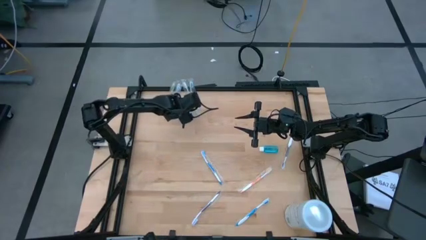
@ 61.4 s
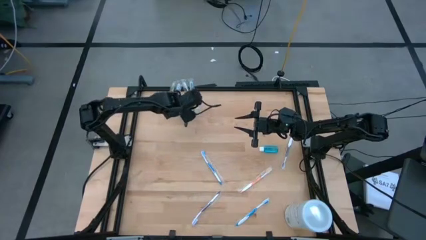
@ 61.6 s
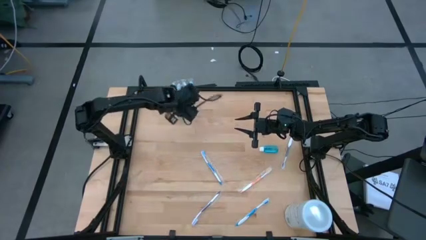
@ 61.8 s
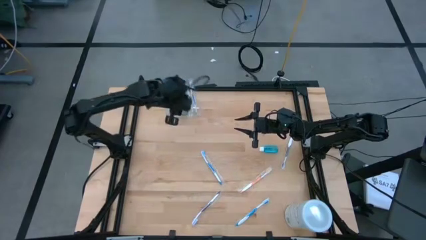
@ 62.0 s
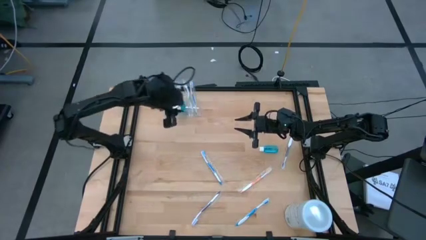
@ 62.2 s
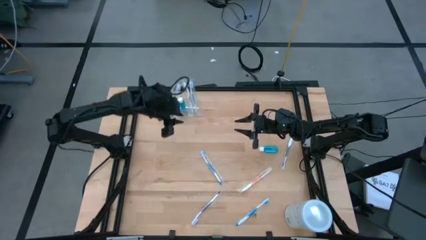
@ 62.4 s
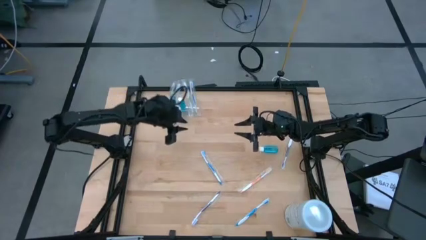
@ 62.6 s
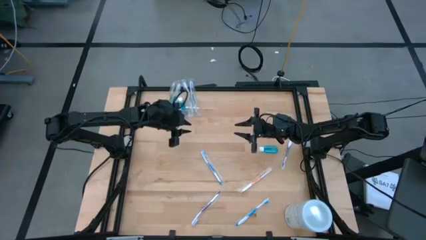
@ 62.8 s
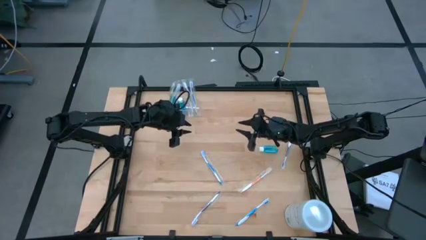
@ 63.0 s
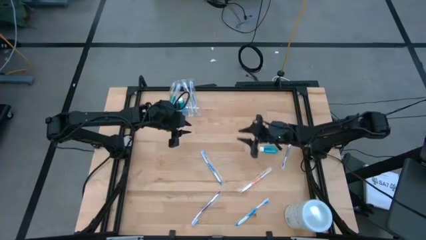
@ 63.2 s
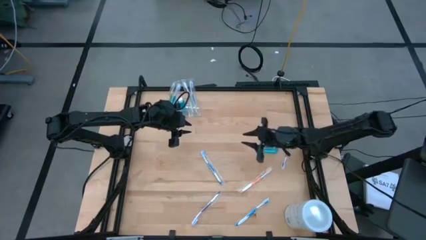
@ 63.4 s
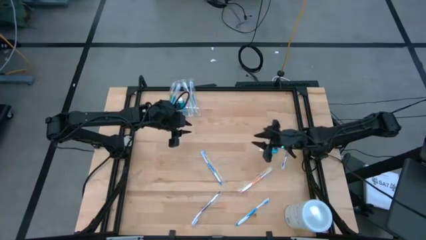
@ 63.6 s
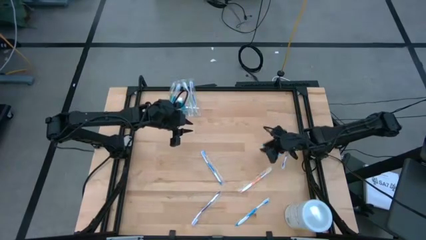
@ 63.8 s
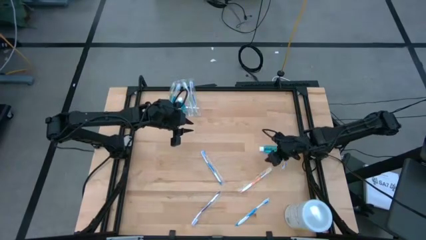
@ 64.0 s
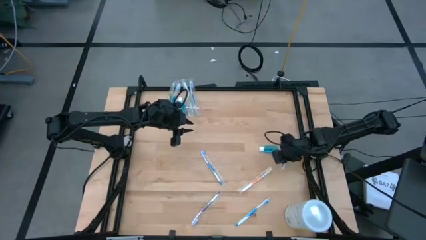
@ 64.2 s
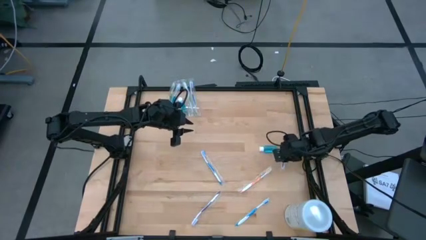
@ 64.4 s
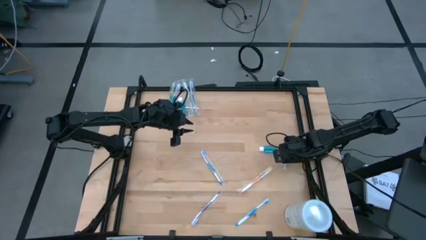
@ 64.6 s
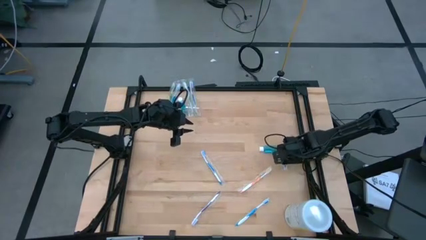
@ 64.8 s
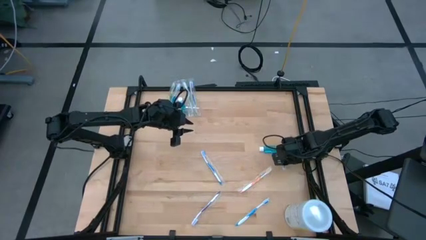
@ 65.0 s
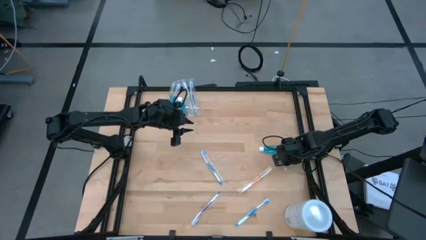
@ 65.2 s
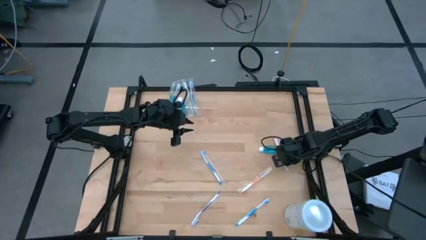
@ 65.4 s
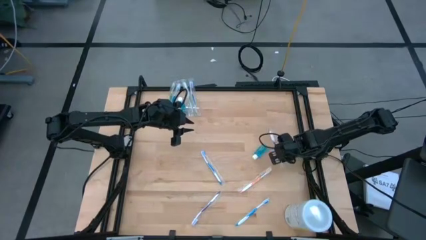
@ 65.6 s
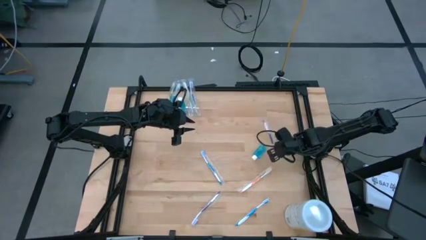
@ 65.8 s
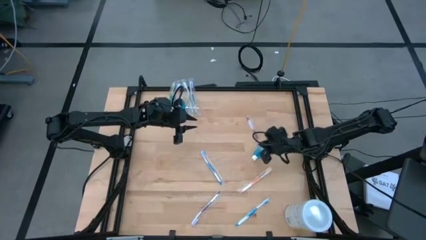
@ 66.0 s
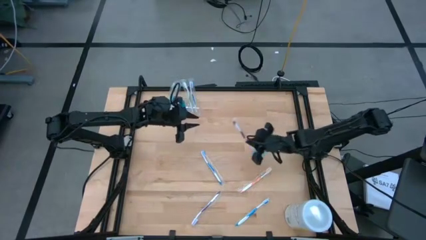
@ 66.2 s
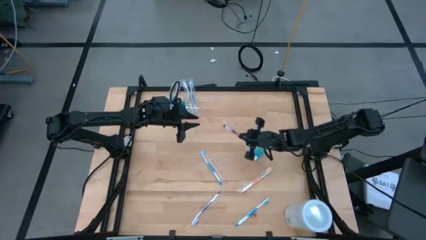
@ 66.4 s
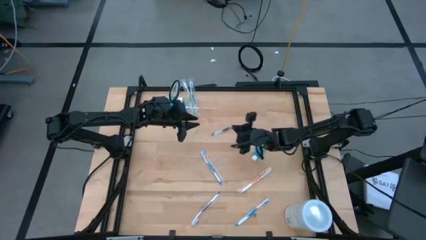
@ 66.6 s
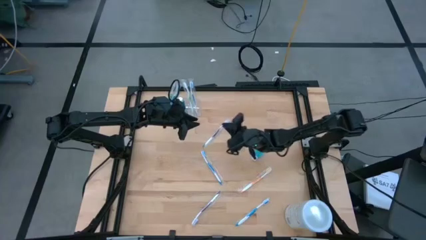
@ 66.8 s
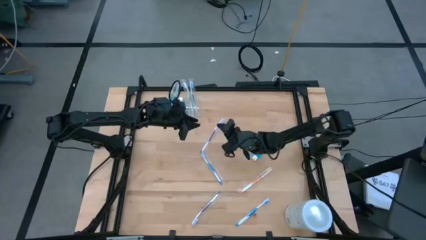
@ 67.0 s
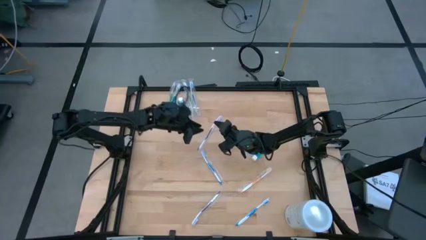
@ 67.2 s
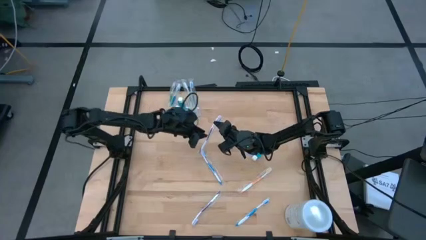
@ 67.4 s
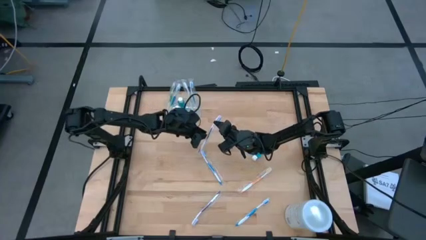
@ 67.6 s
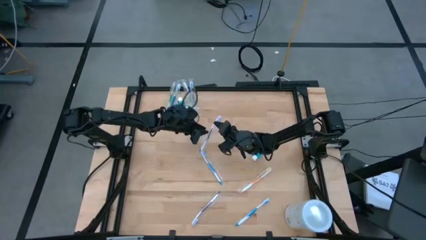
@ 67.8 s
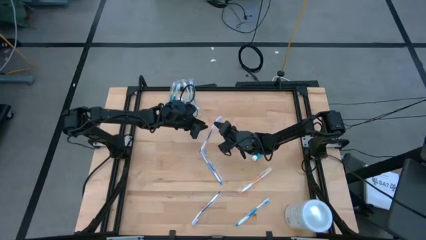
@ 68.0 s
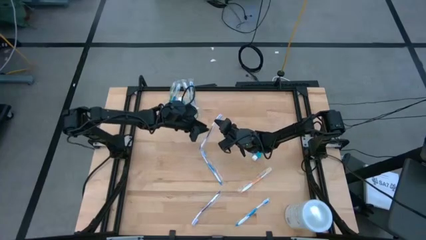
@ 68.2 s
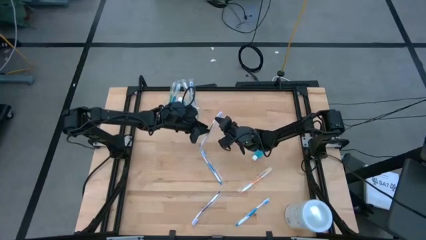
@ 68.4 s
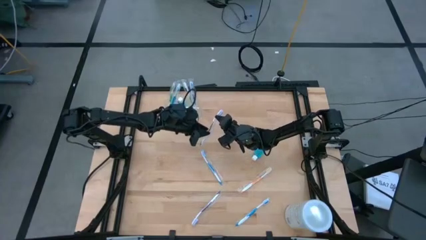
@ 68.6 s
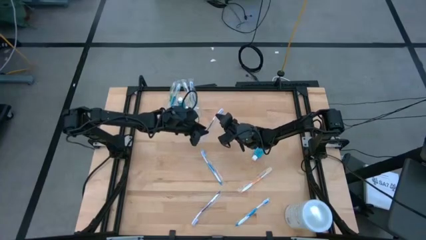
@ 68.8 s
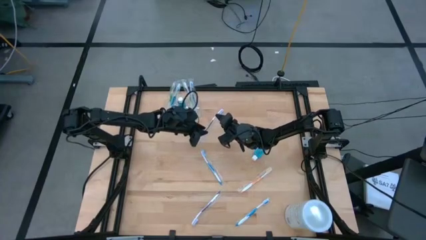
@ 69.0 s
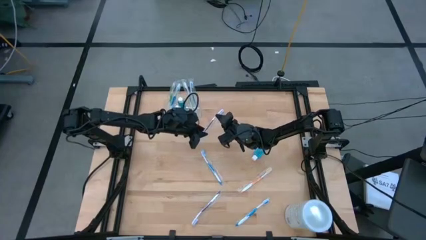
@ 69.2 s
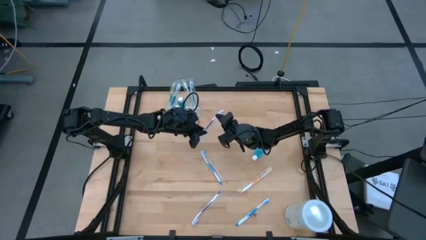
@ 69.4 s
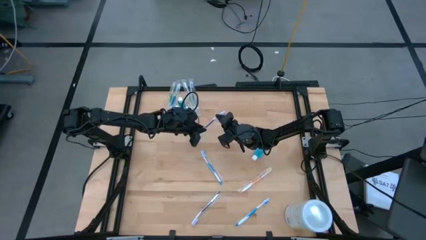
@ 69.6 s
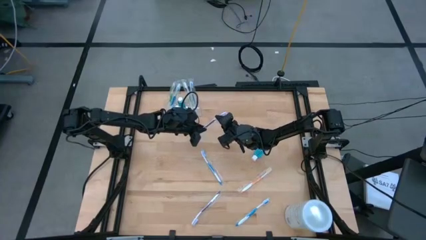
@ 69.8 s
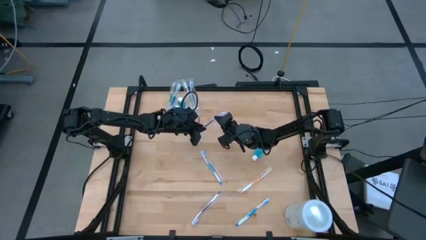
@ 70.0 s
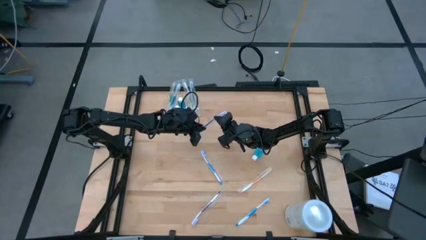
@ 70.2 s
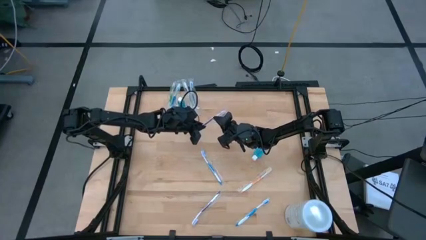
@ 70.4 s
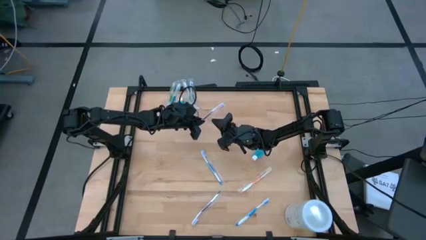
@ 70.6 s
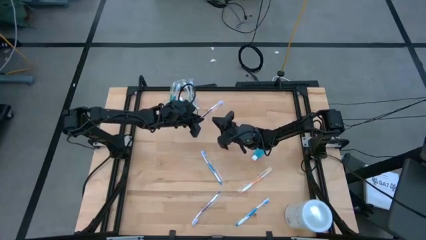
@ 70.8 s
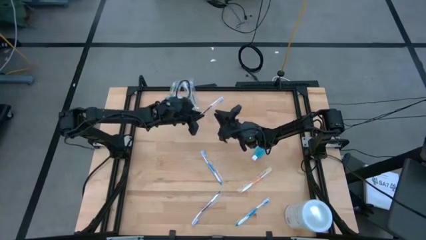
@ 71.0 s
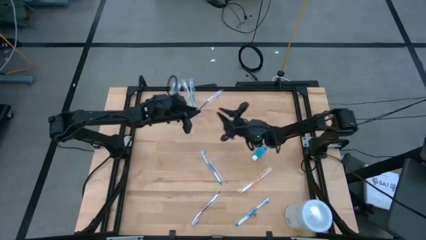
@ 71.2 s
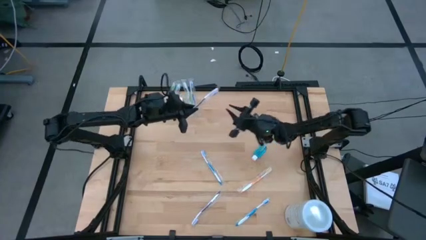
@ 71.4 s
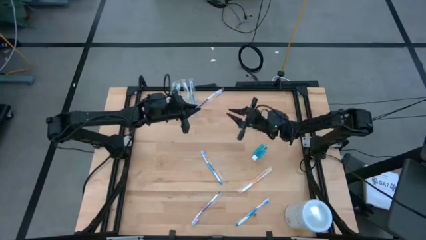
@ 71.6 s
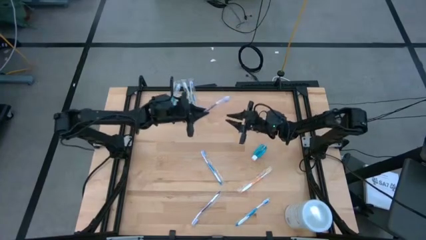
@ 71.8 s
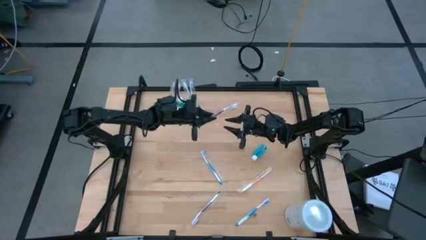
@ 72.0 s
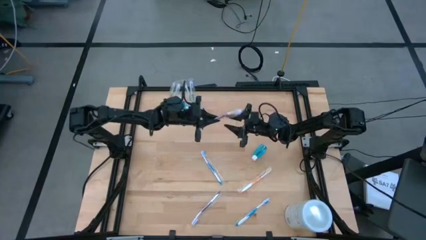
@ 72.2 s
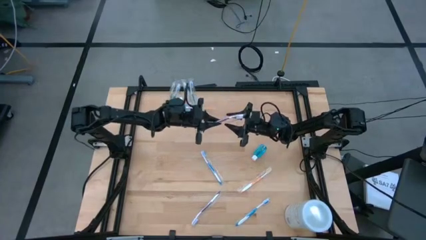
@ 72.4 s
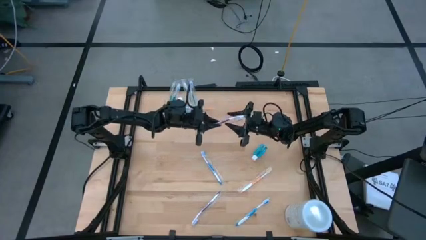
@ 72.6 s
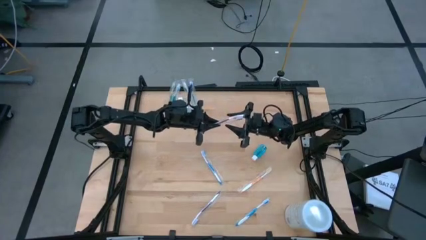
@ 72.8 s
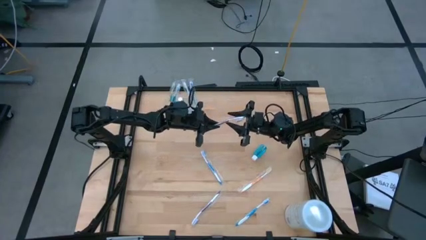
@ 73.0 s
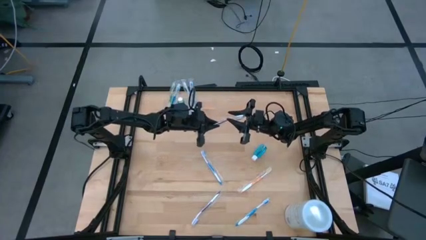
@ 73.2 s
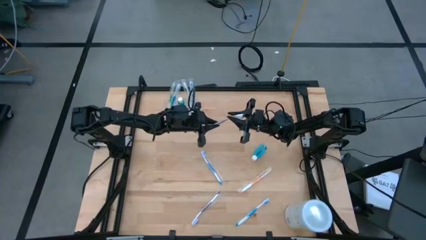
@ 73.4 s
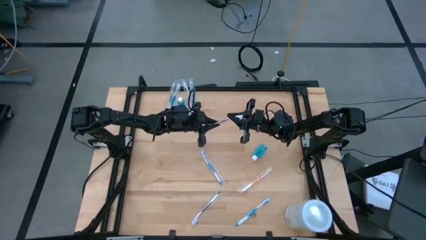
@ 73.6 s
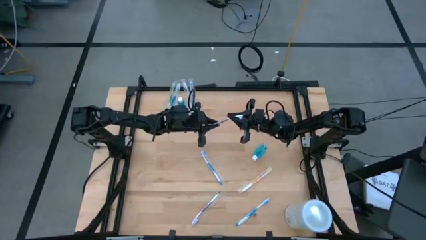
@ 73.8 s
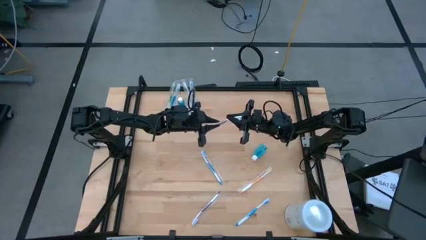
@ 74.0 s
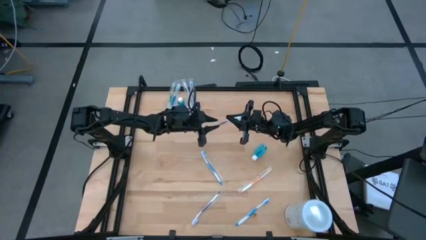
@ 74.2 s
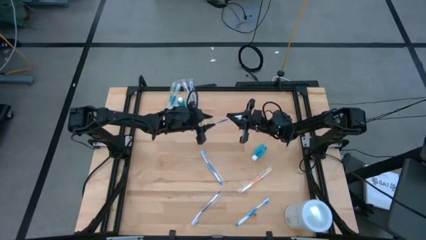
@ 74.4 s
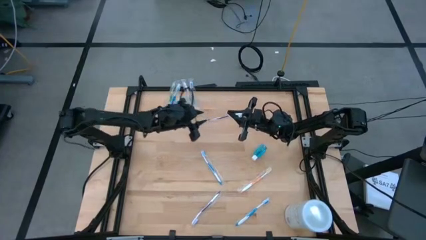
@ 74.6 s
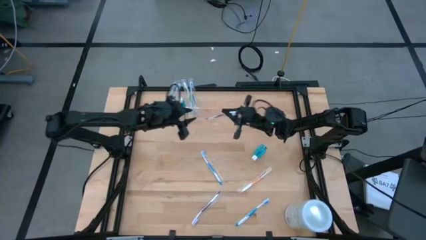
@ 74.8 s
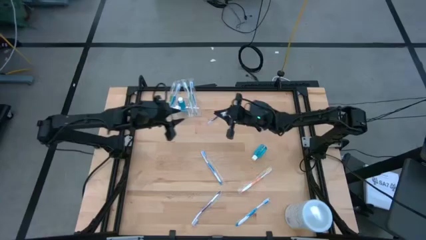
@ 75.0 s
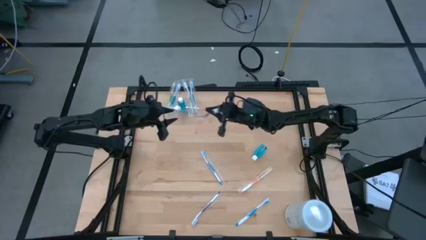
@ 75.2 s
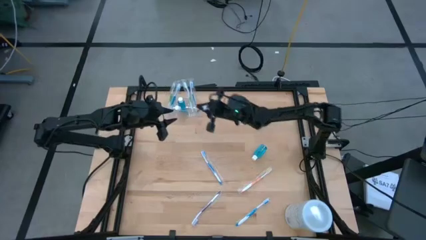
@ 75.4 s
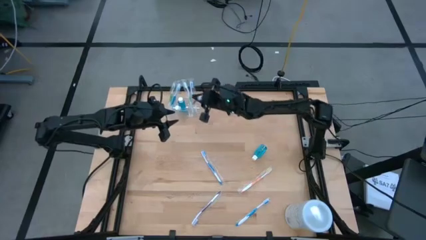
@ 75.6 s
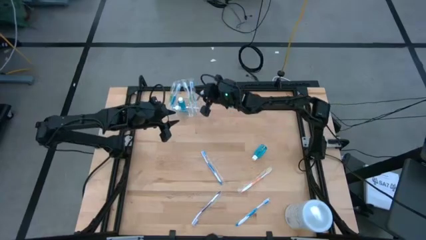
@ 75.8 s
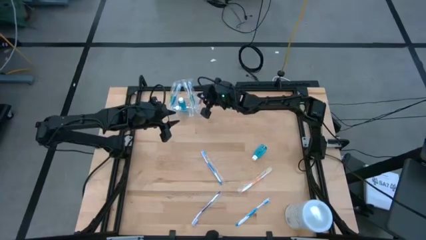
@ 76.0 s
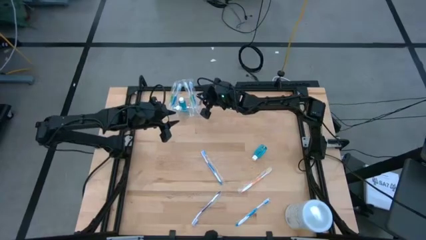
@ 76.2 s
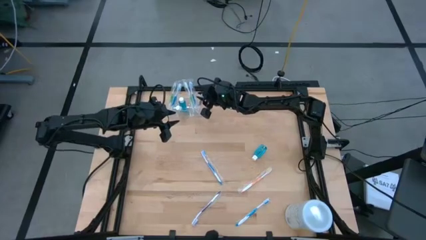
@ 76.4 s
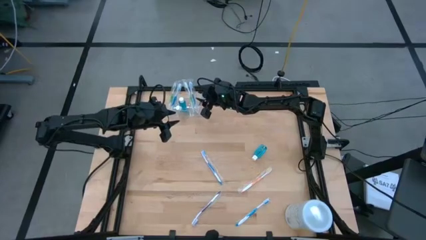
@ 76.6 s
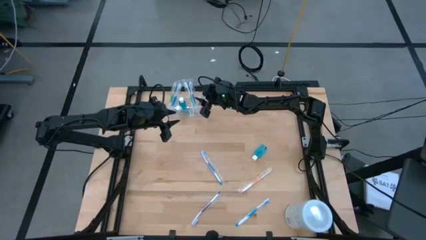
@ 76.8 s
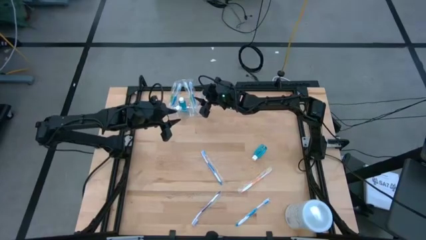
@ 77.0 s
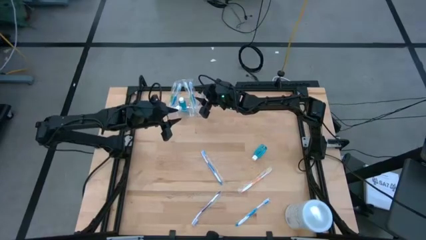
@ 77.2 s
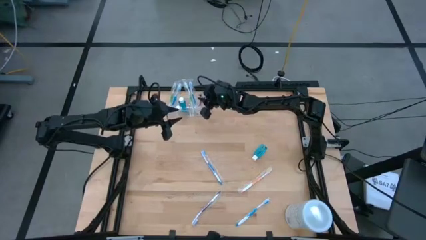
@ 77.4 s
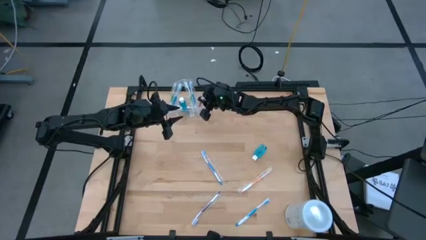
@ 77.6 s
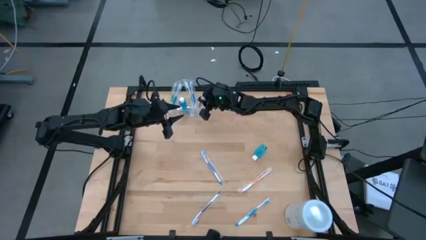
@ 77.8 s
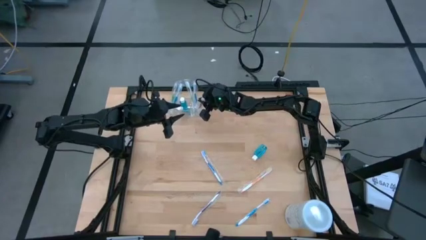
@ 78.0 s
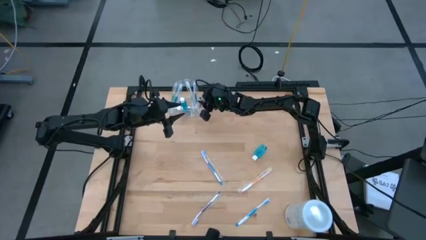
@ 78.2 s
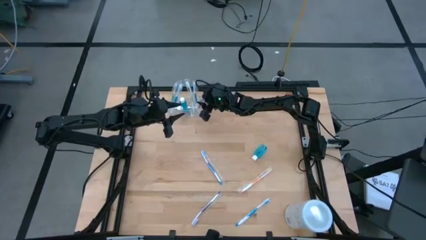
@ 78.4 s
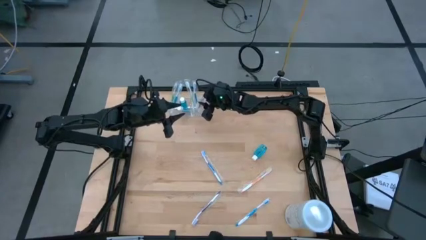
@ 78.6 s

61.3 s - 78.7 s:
Task: Pick & Place toothbrushing station
Put the violet toothbrush into the transparent organizer
